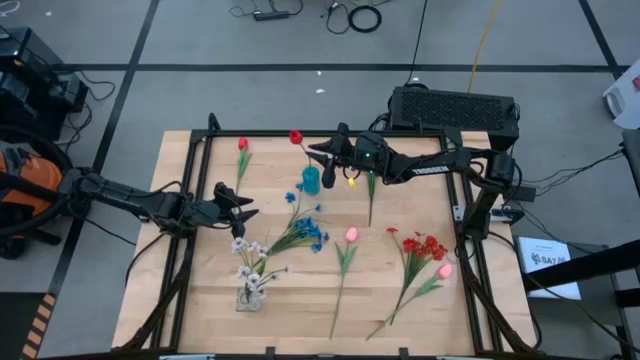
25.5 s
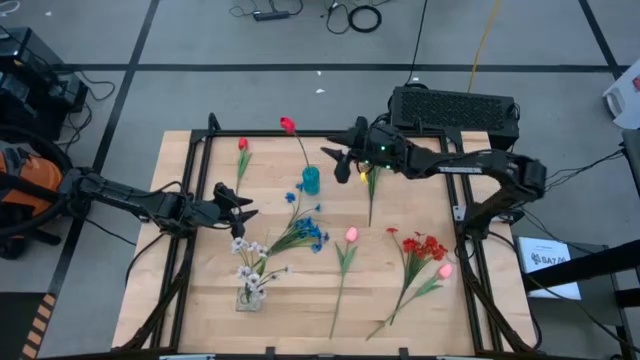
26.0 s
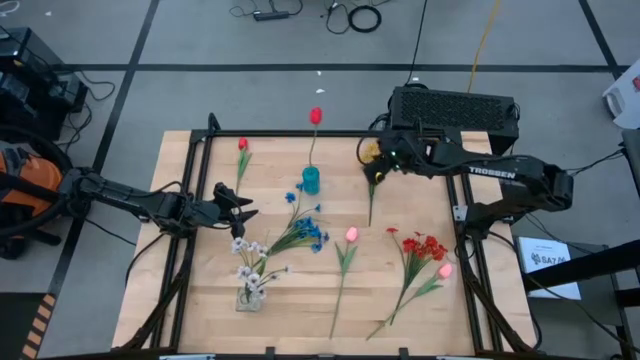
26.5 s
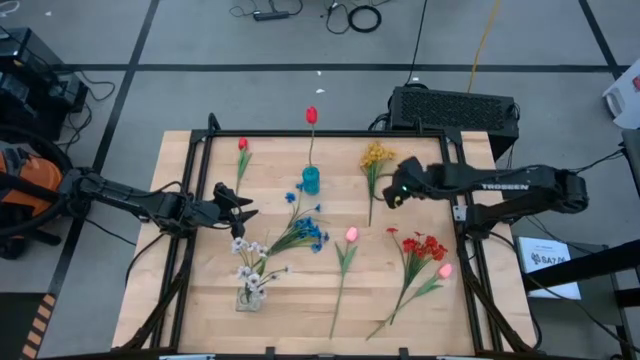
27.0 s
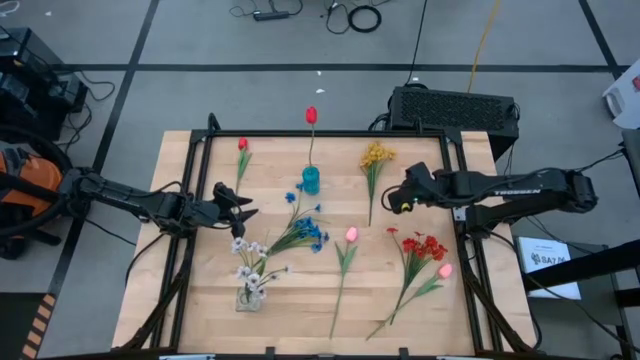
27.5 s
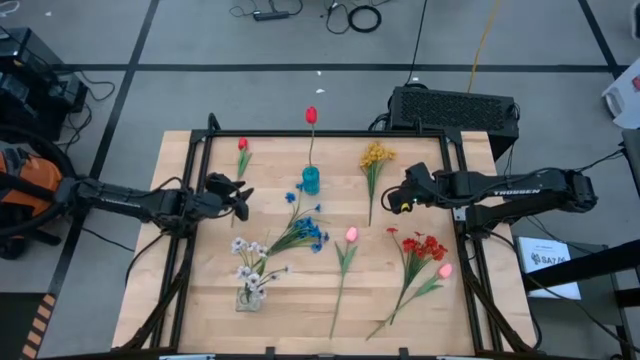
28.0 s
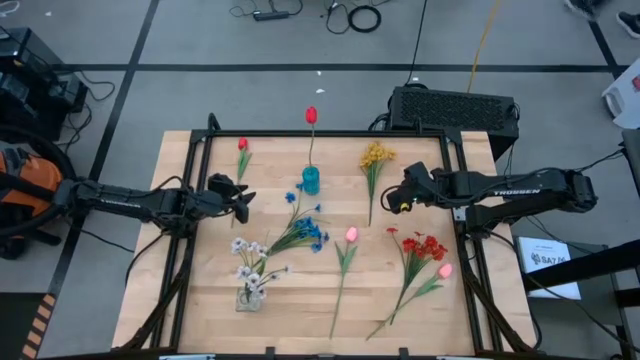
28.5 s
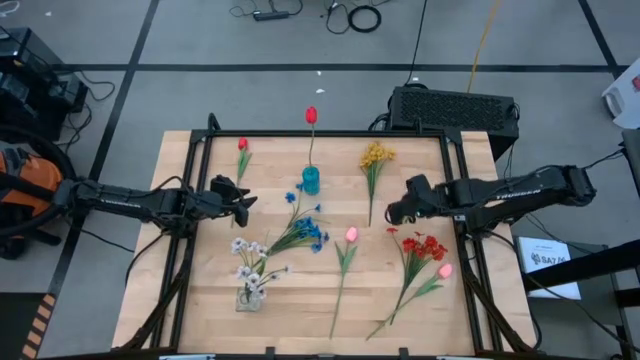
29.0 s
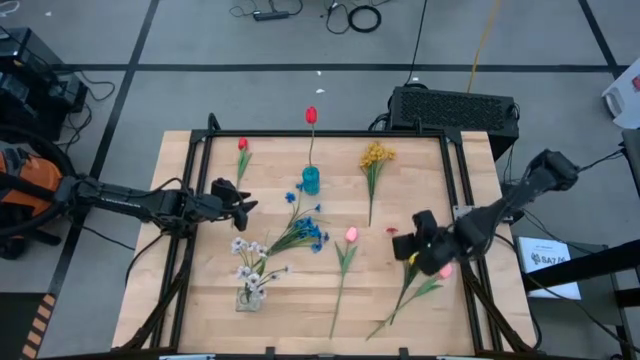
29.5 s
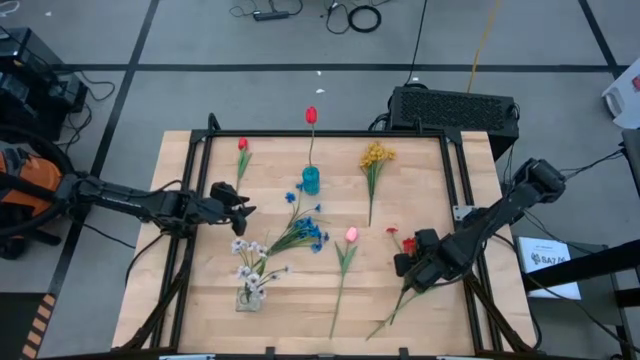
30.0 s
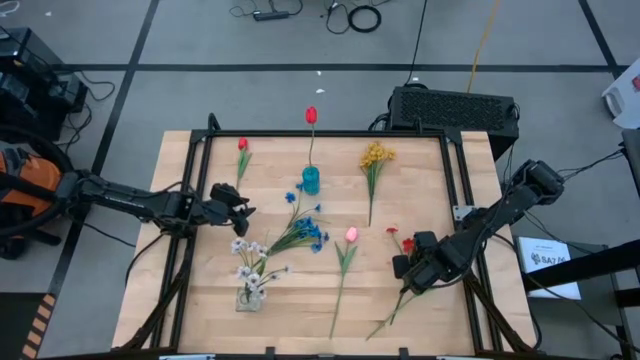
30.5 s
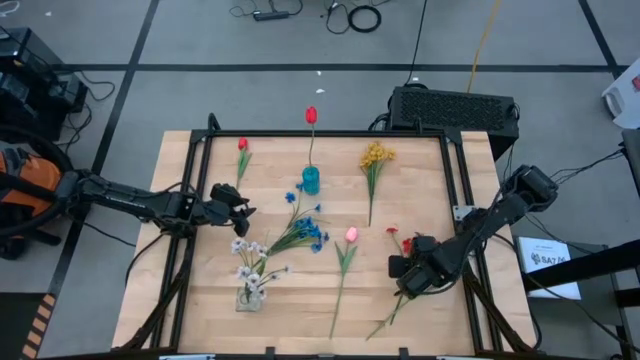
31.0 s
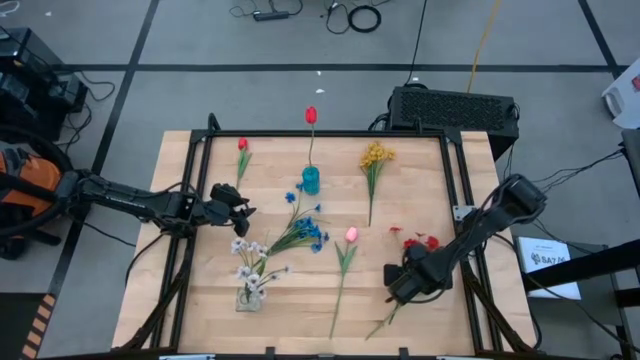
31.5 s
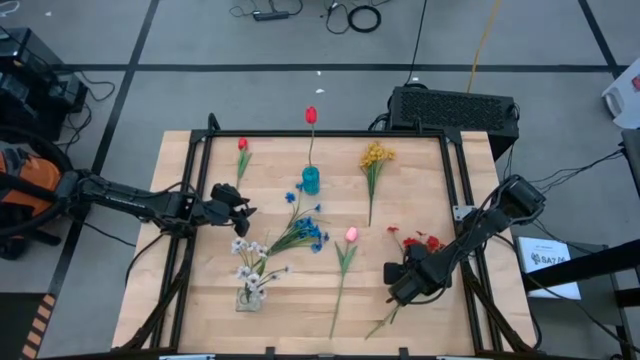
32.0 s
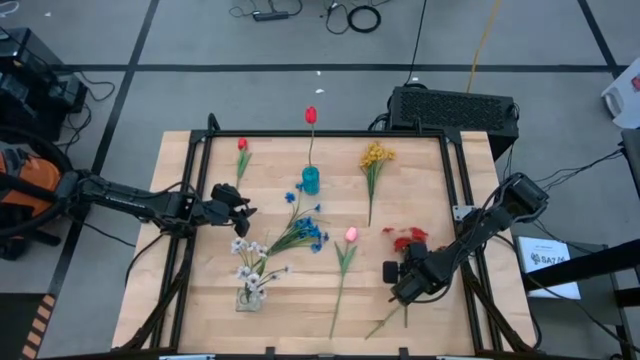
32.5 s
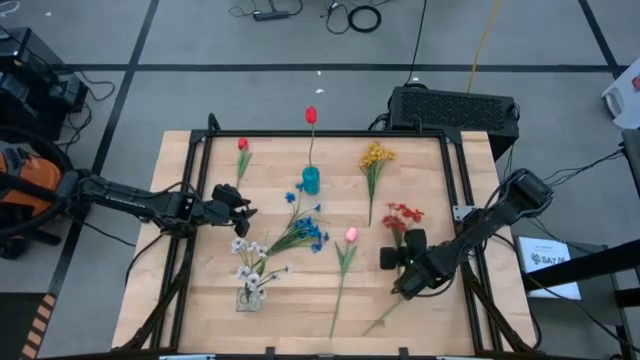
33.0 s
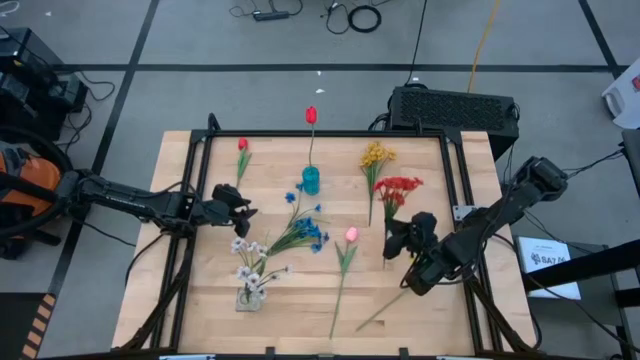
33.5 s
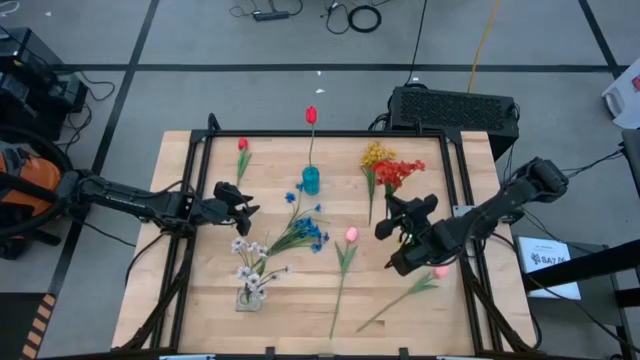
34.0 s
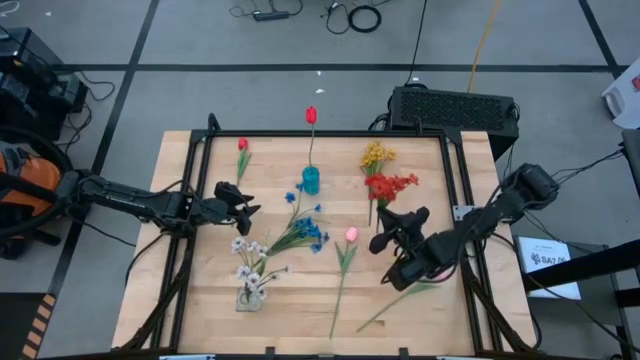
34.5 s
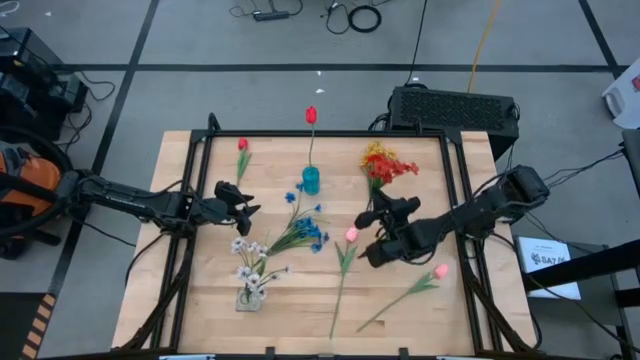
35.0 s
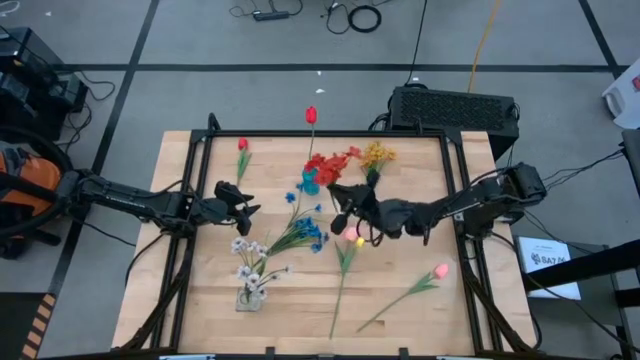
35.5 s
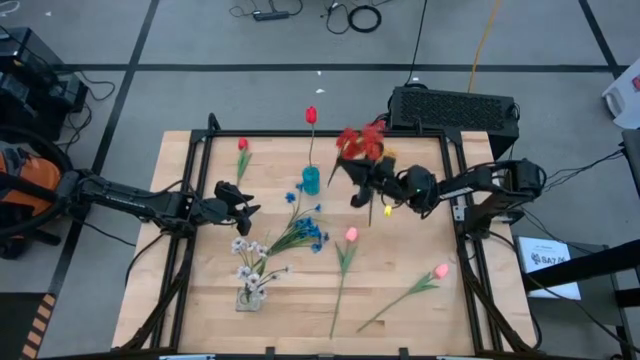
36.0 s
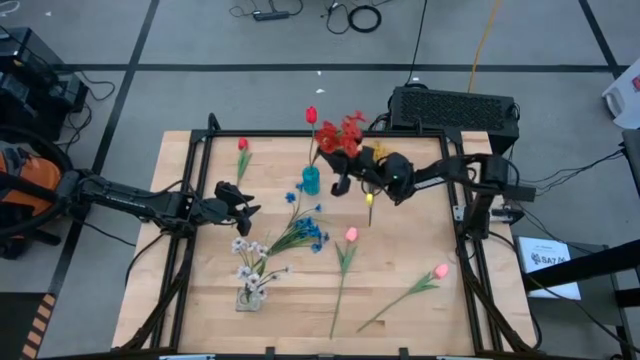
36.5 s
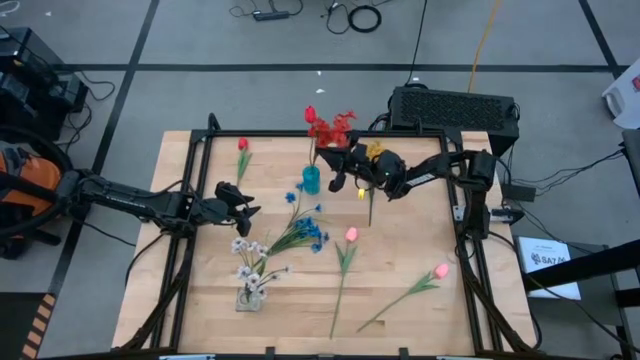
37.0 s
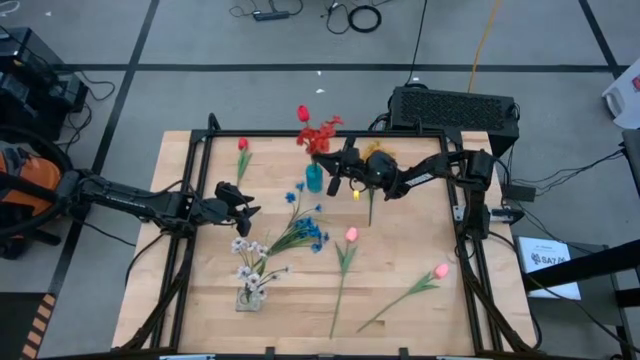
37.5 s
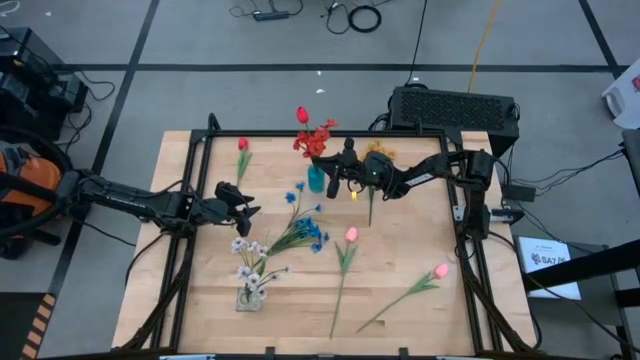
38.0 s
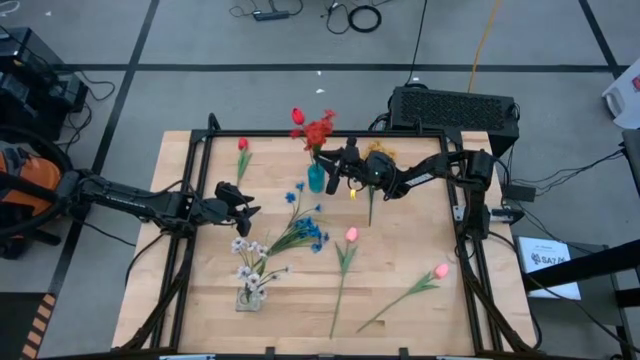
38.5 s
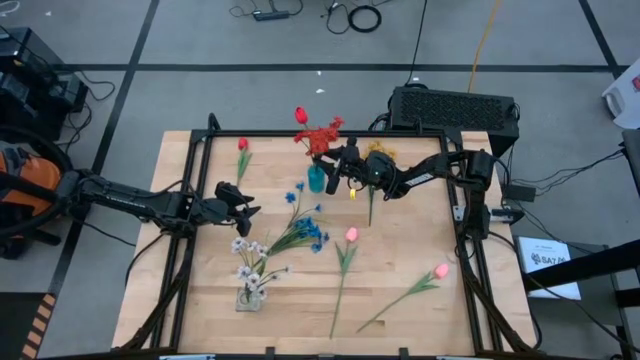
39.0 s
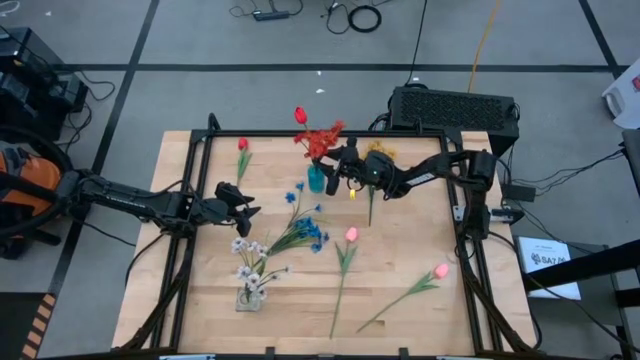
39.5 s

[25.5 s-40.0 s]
Task: Sort flowers into vase by color
Put the orange flowers into the blue flower vase

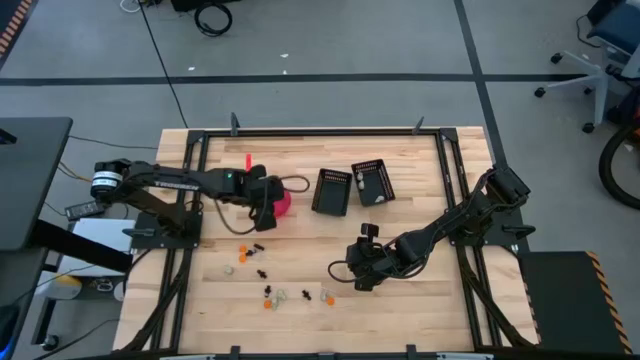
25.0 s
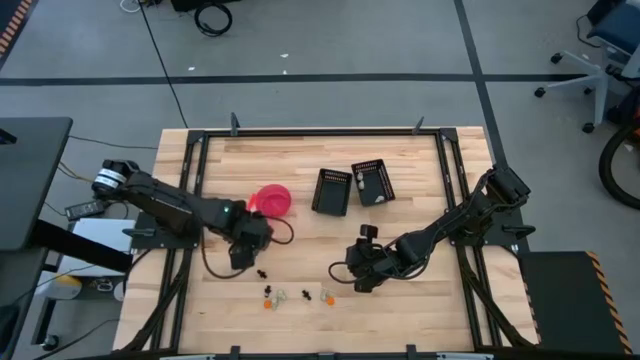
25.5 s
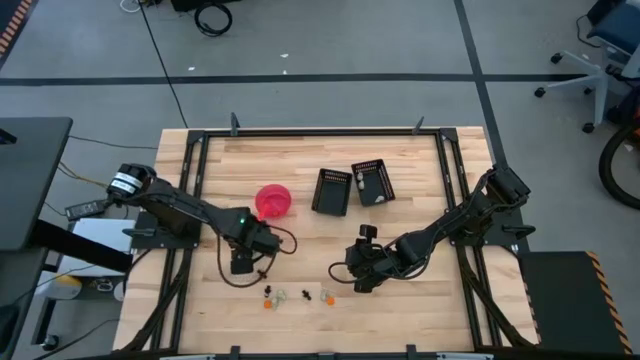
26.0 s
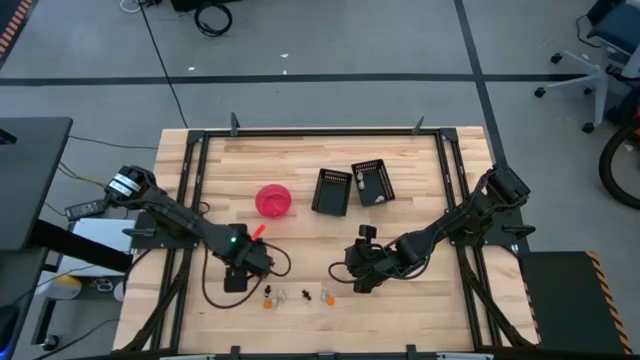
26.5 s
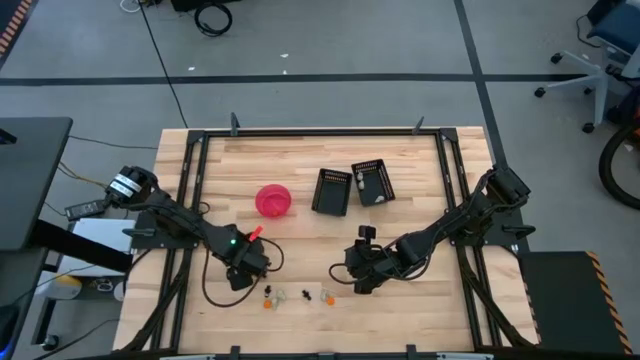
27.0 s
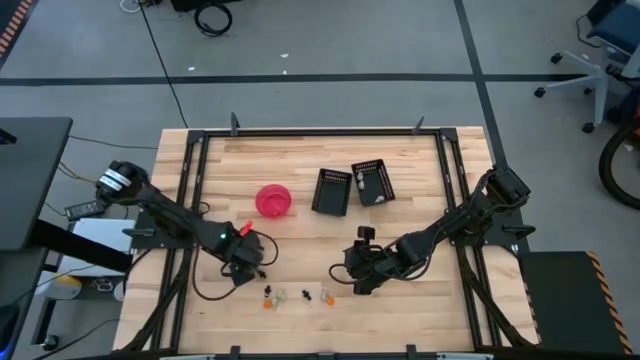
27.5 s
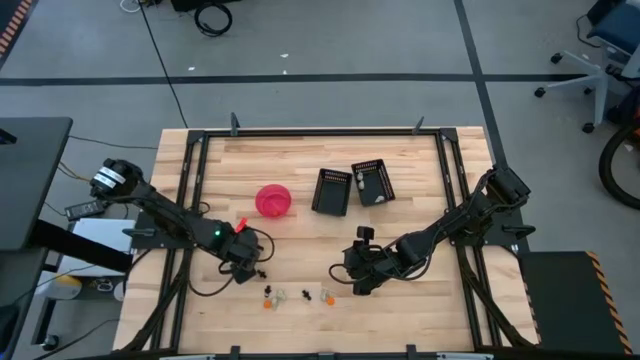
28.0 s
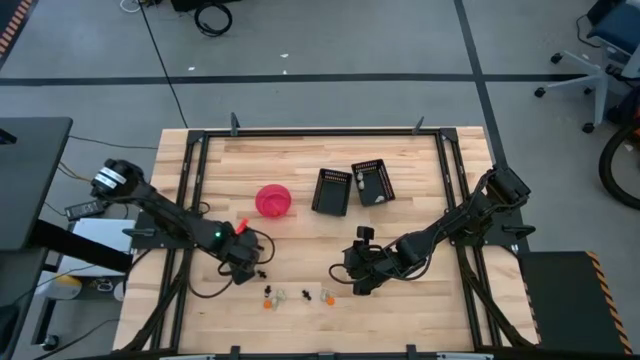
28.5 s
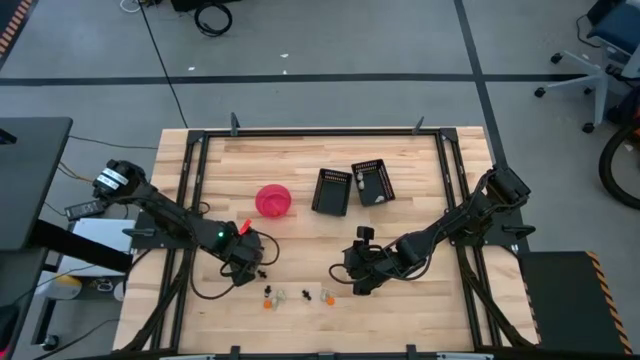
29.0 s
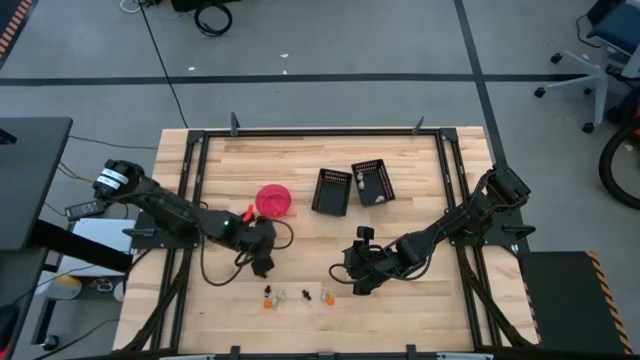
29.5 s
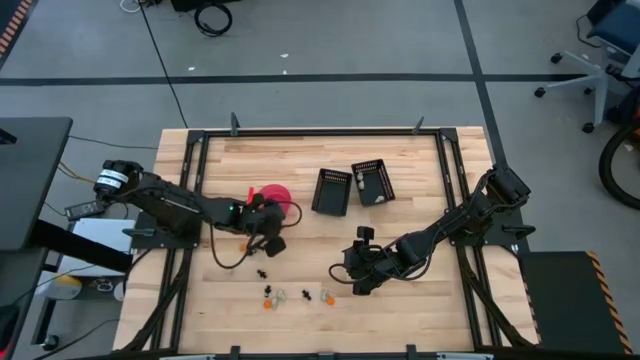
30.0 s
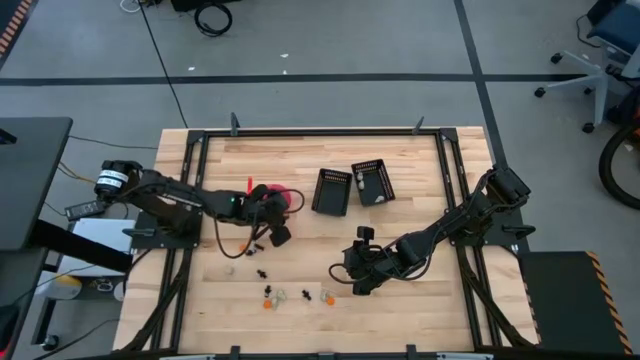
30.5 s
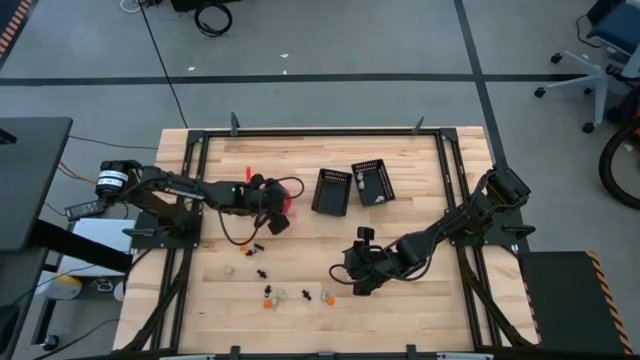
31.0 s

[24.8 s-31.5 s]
Task: Sort Halloween decoration
Put the orange pumpkin toy into the red bowl

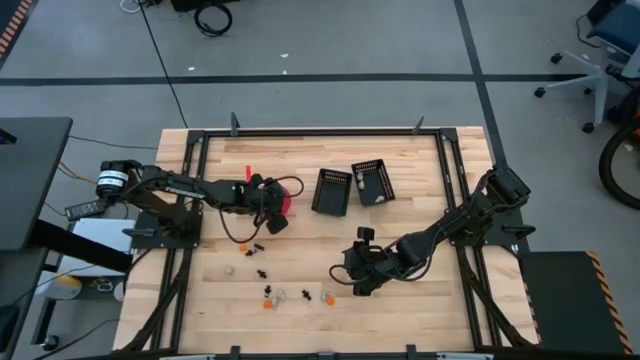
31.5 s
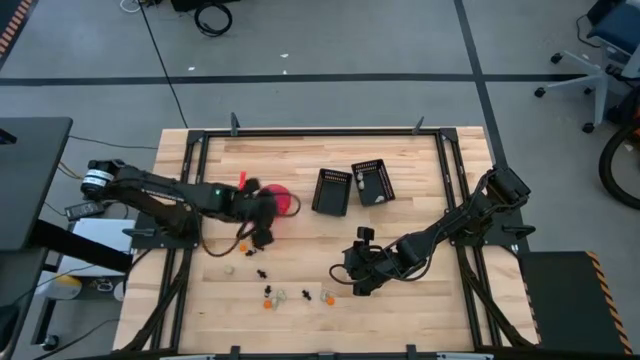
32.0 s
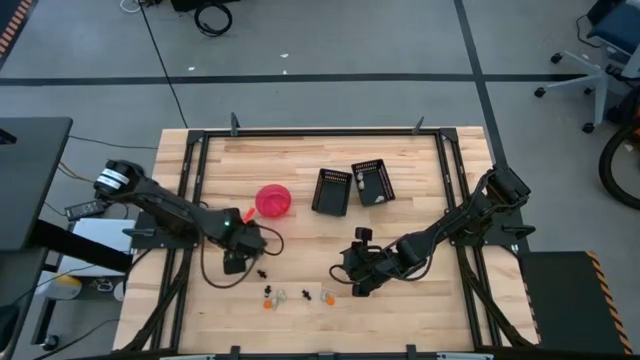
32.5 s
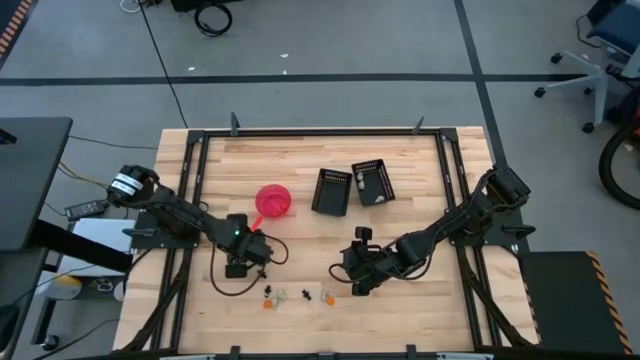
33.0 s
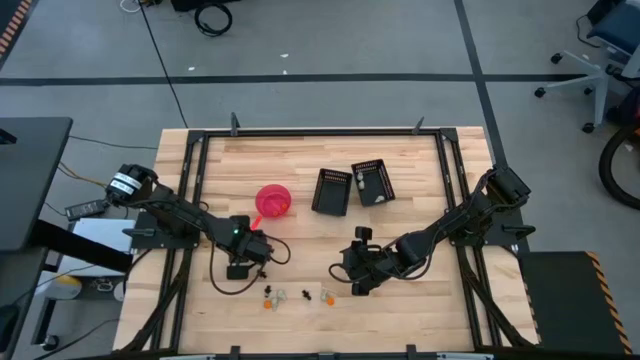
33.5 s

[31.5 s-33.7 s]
Put the orange pumpkin toy into the red bowl
